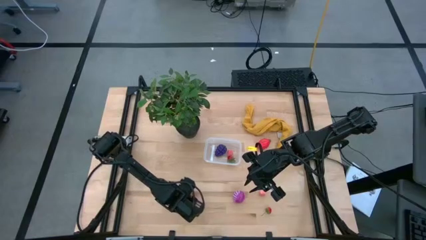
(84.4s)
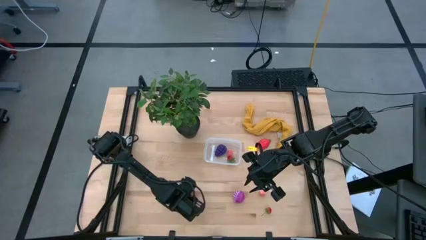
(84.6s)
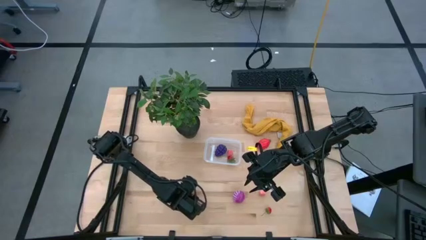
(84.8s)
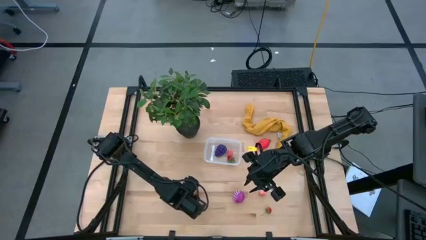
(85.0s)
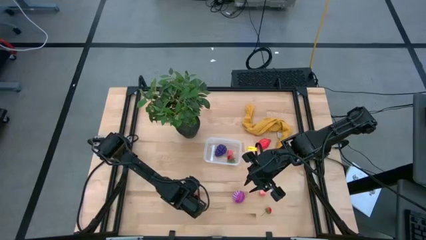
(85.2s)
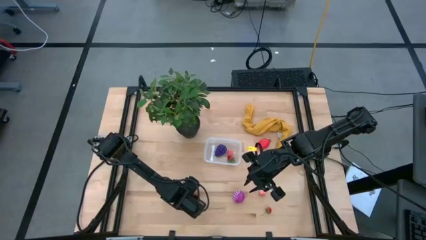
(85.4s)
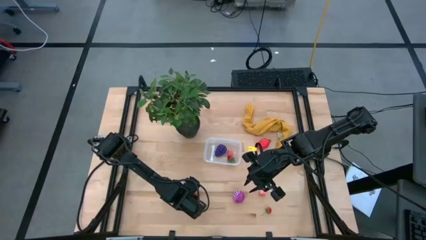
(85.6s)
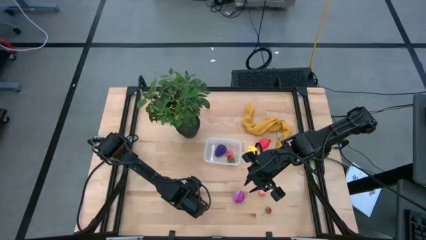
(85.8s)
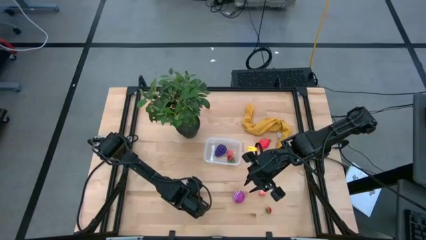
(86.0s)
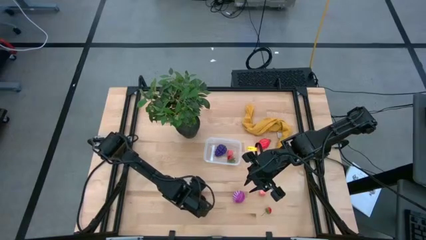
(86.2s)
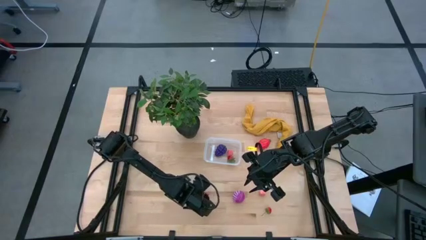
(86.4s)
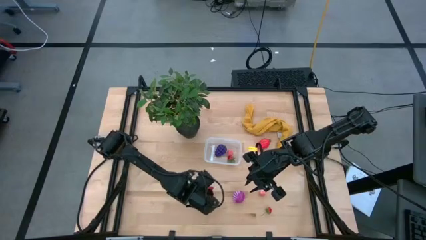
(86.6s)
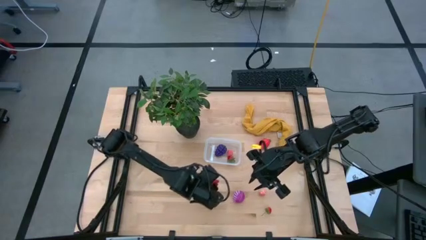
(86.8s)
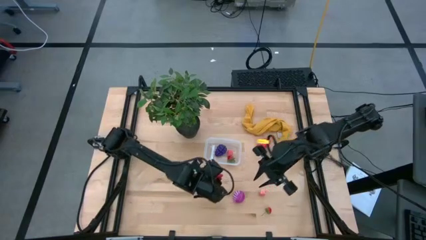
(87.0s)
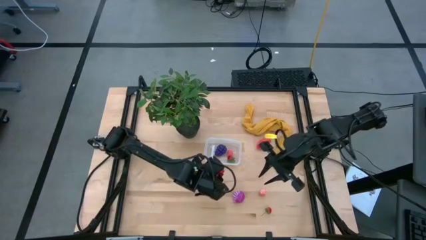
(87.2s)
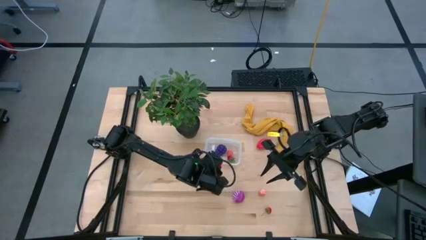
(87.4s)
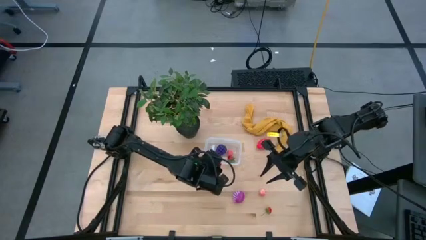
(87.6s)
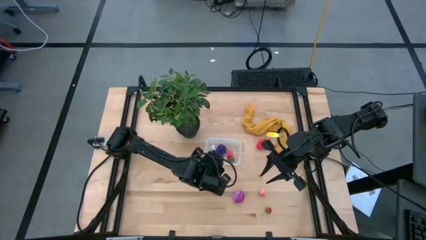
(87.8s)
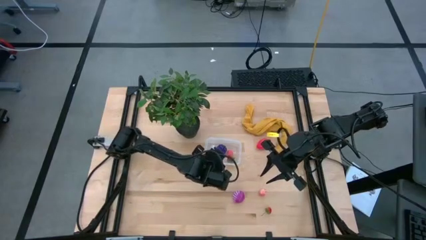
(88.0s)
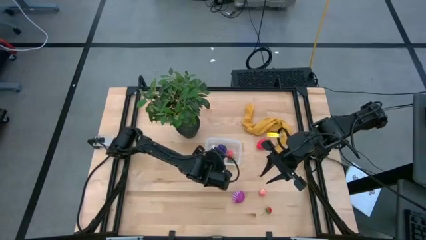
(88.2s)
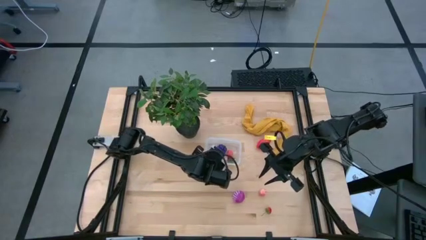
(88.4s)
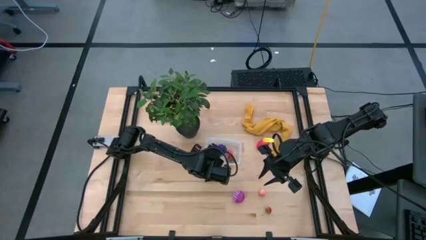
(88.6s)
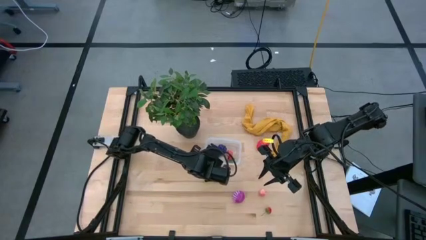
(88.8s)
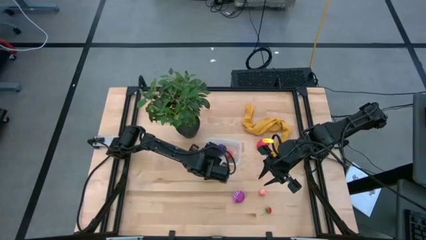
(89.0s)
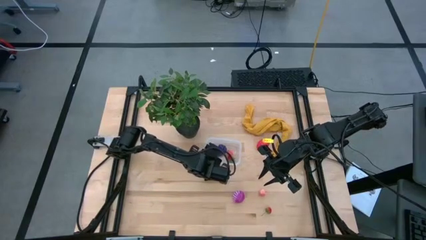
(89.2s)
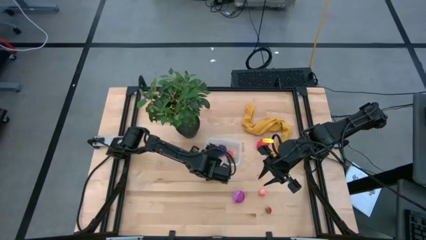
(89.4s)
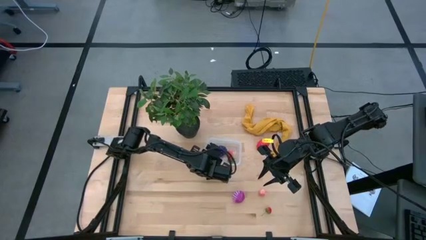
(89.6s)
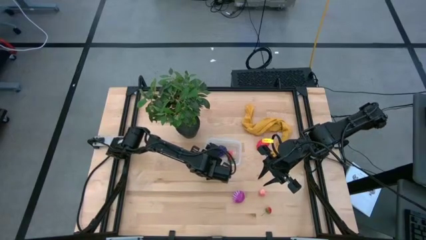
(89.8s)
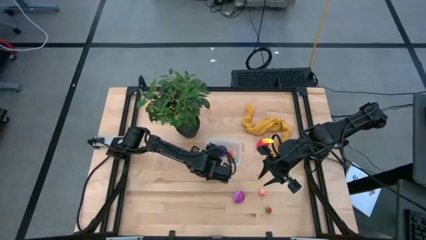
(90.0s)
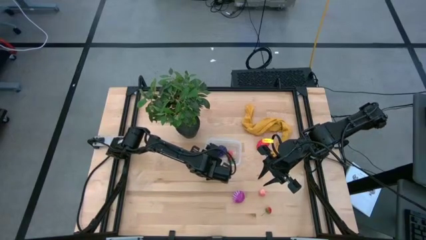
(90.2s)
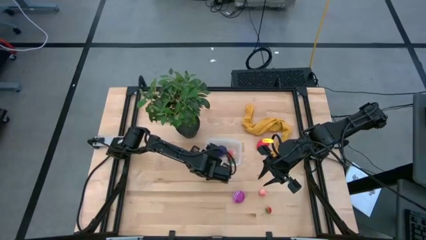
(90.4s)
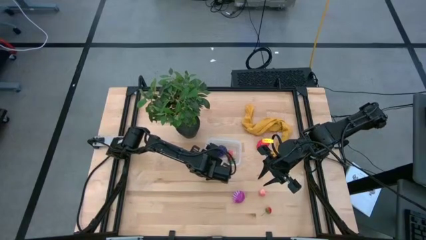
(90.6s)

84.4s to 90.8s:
Task: Pick and placing Produce into tupperware
Put the left strawberry into the bin

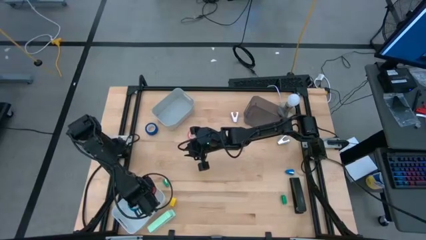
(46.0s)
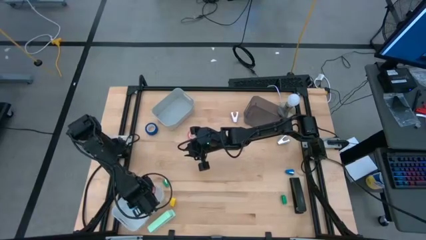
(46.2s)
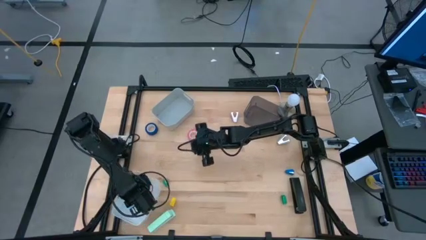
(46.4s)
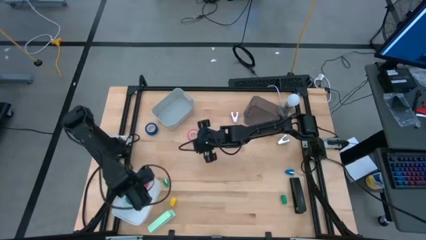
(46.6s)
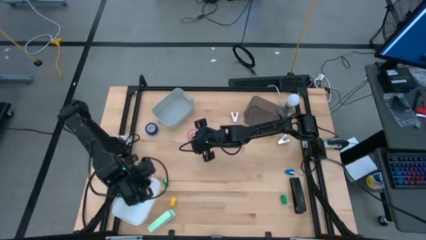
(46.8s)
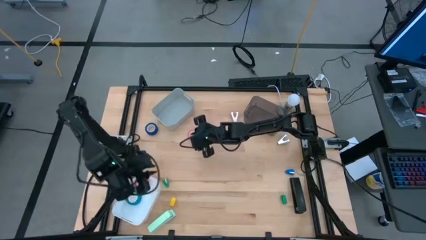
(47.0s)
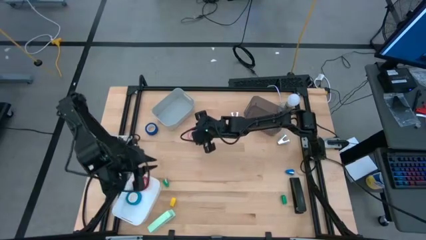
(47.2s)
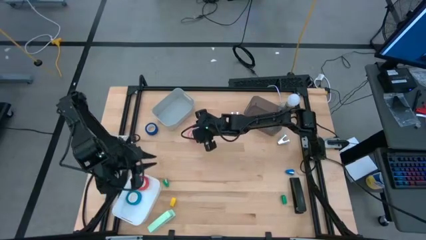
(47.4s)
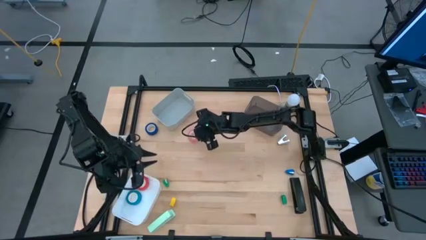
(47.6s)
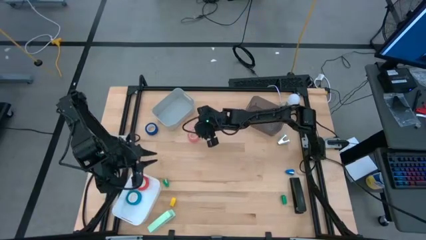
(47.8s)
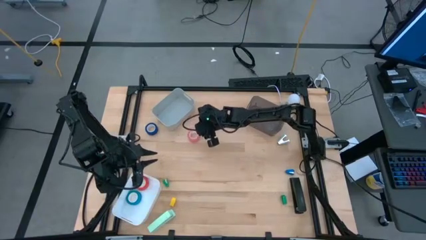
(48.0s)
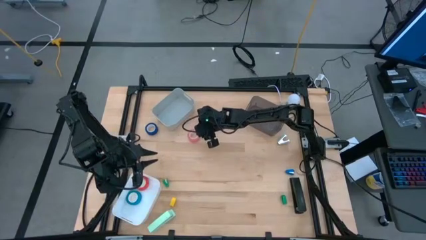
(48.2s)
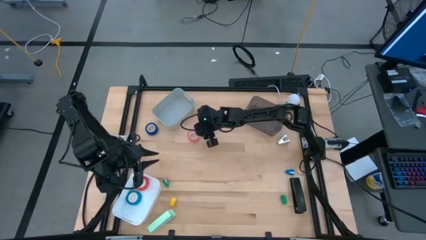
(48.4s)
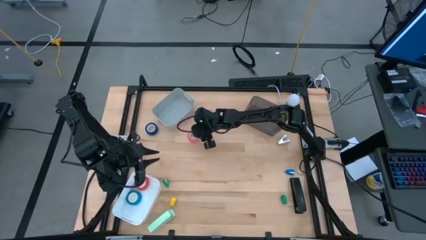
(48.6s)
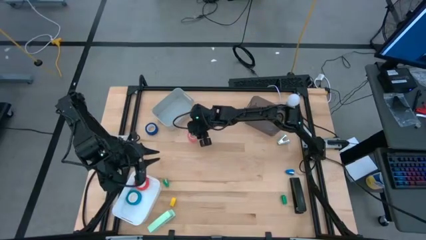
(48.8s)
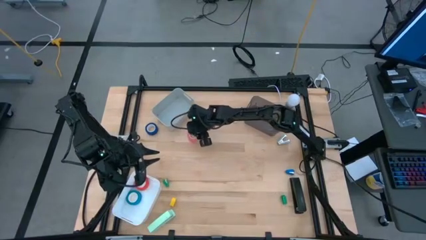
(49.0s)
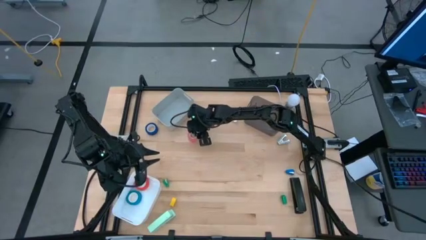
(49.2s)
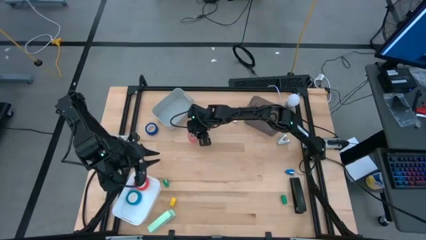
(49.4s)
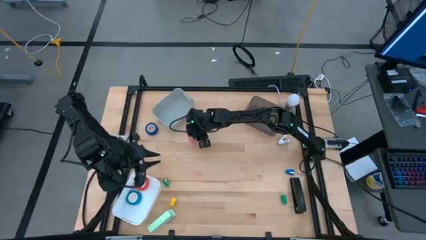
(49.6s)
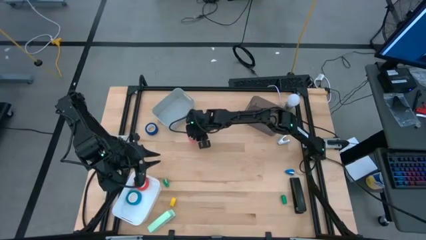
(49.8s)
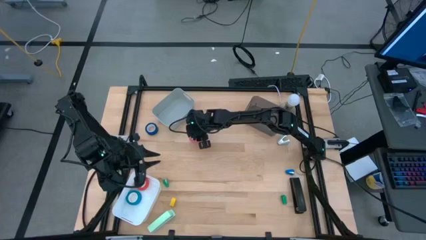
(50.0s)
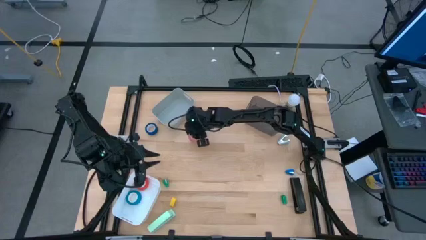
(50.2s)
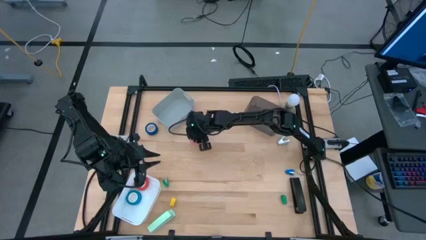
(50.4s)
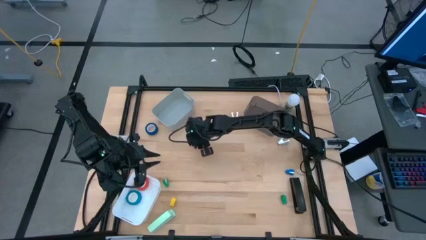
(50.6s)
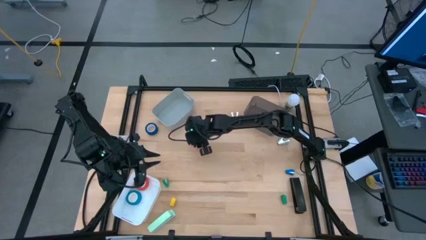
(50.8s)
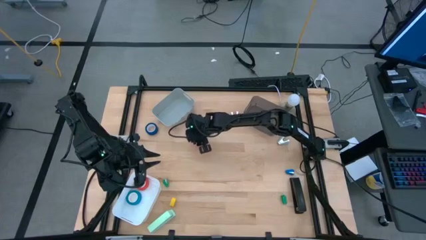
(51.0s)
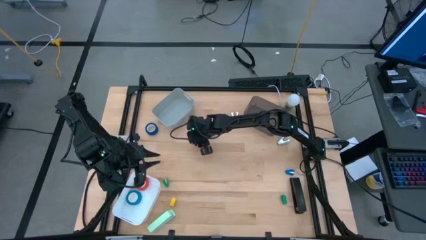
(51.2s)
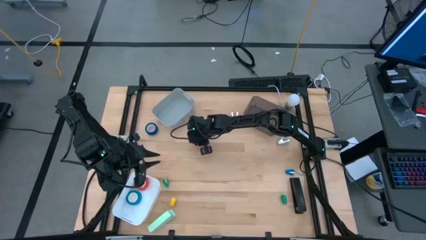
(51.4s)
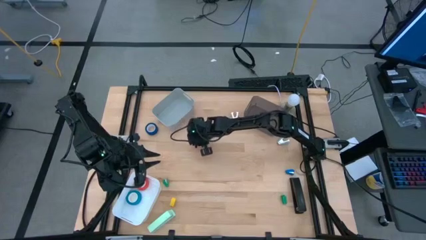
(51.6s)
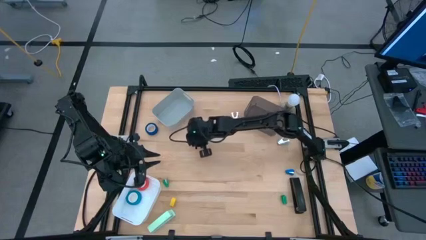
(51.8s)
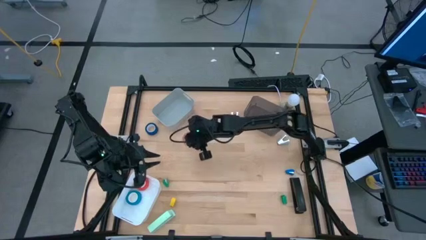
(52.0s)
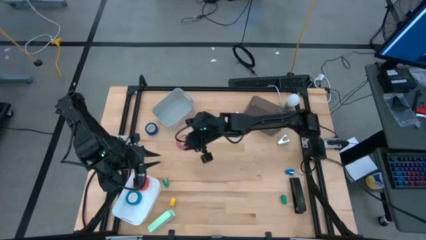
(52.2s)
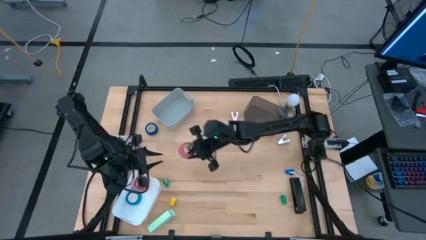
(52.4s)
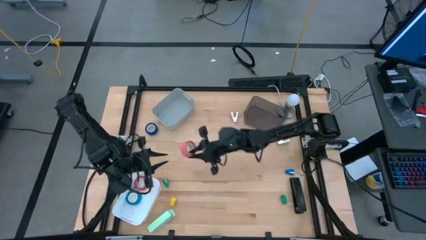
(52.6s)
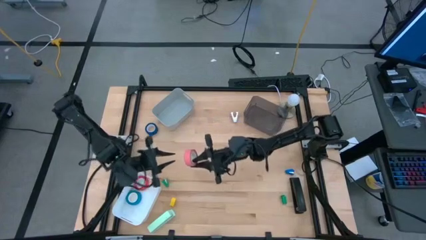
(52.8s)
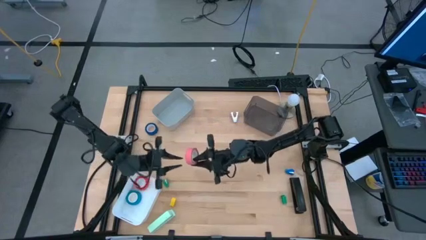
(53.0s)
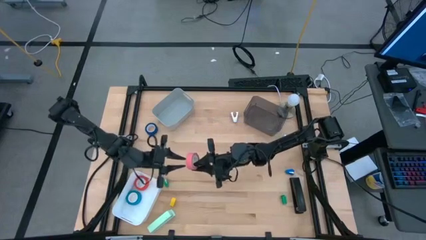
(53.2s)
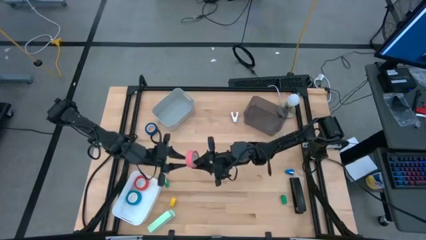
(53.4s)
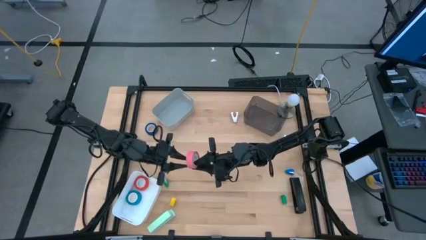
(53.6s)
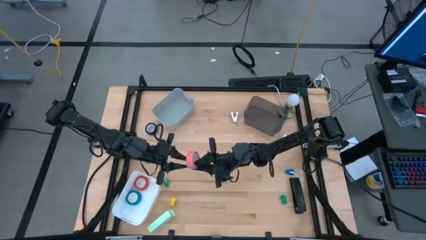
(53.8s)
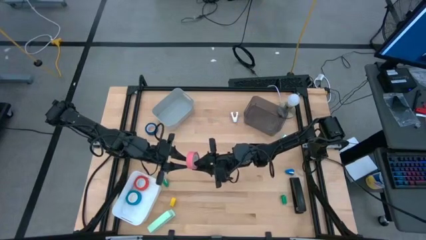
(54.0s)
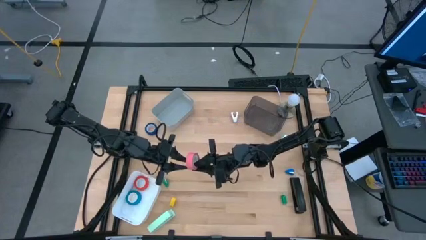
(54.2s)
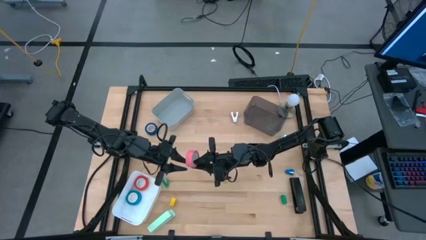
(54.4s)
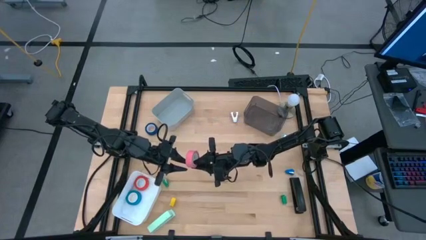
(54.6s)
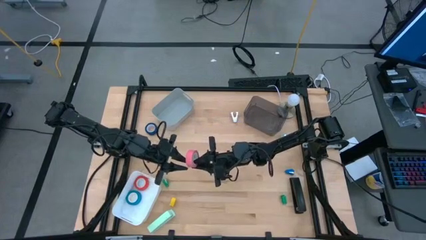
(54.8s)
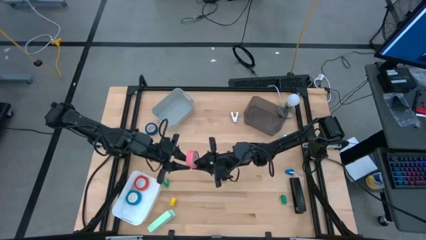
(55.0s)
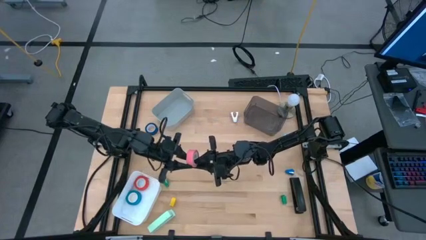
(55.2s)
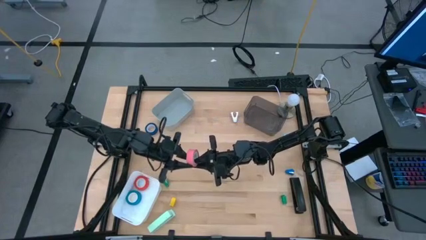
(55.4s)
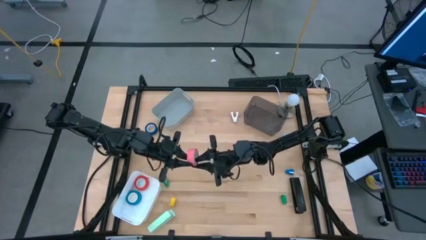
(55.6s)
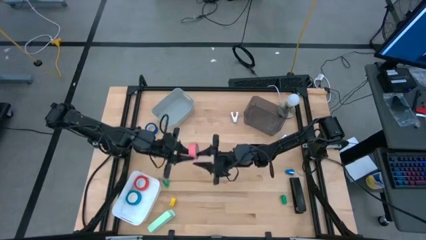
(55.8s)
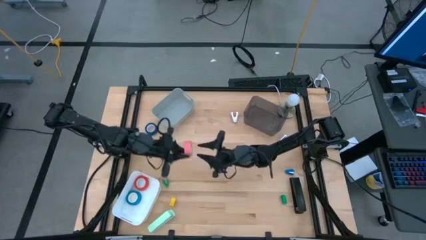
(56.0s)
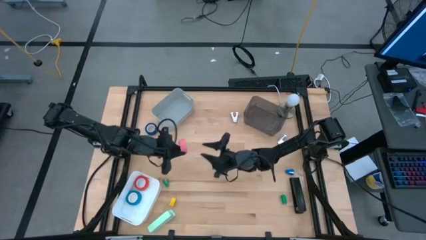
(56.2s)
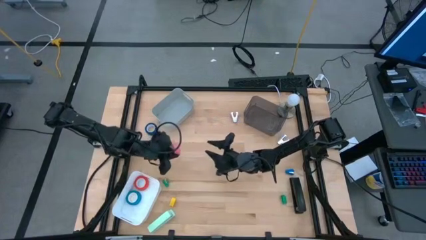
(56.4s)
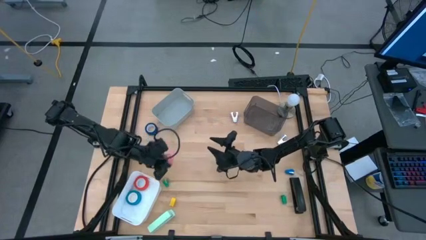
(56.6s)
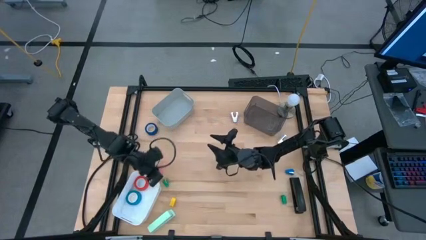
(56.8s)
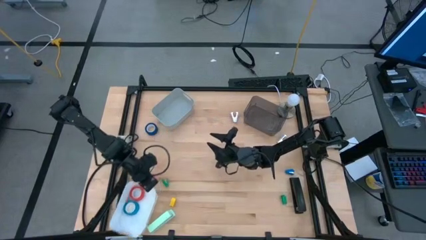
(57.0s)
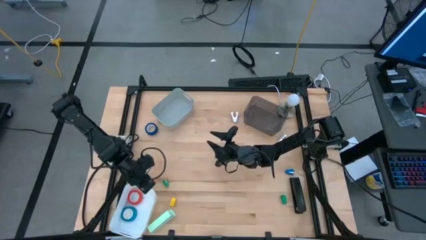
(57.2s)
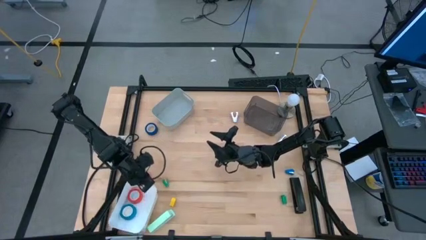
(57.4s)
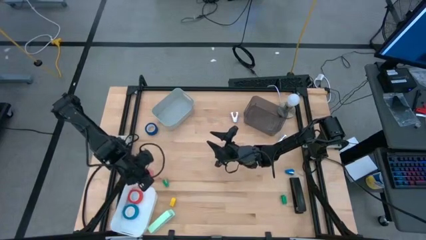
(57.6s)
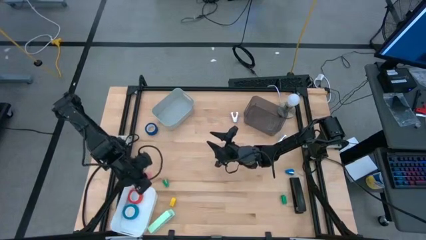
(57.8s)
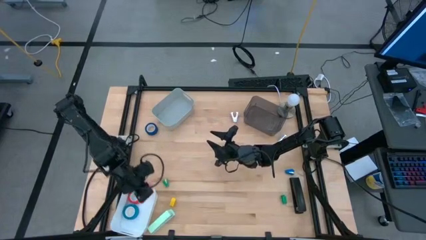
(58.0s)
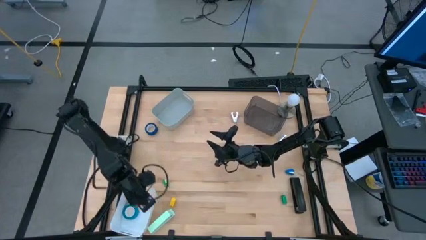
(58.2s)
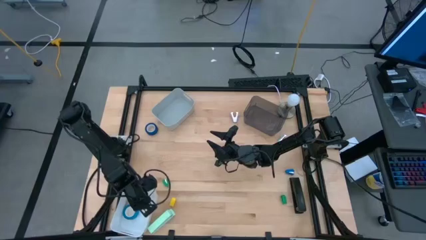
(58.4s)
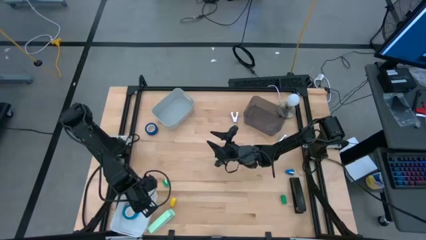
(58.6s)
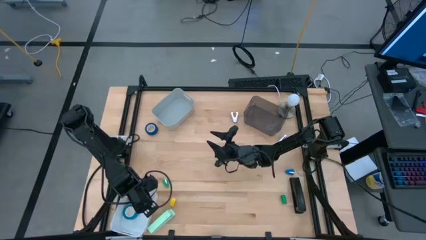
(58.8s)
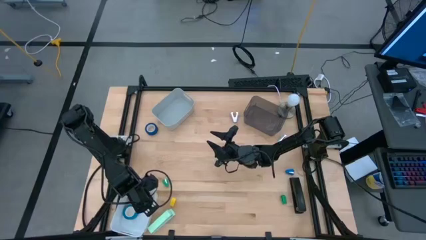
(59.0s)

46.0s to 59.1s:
Task: Pick and place Stapler, Stapler remover, tape
Put the pink tape into the white bin
